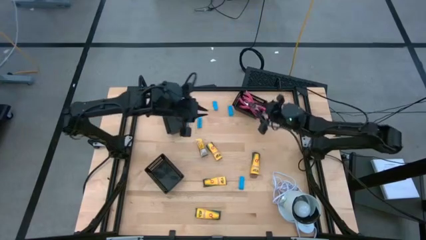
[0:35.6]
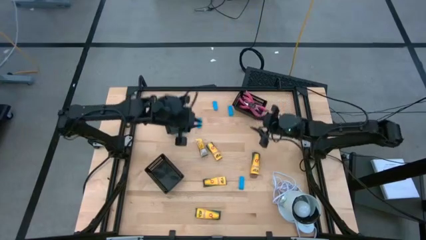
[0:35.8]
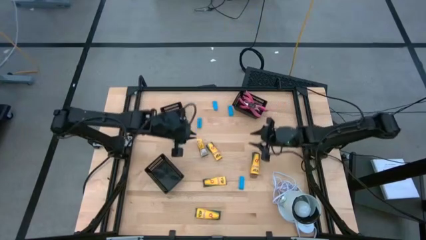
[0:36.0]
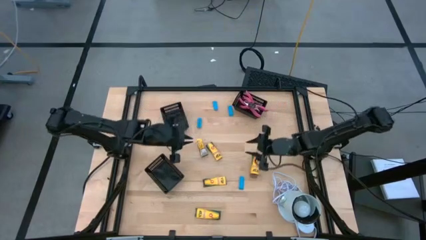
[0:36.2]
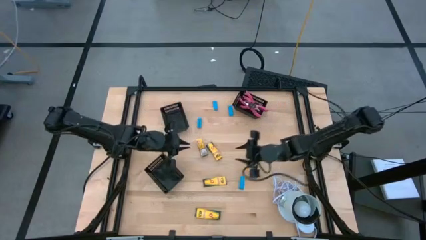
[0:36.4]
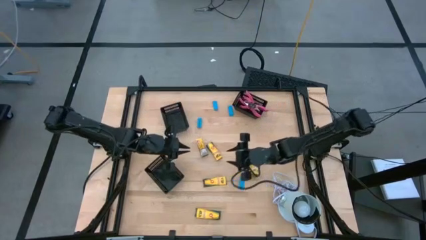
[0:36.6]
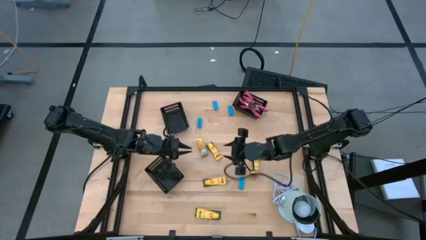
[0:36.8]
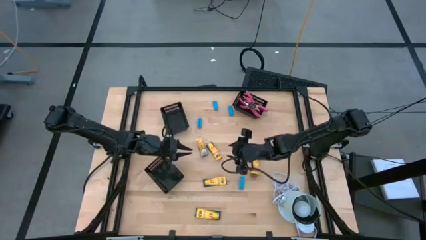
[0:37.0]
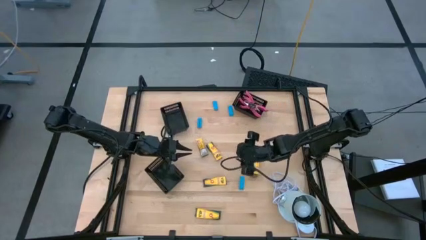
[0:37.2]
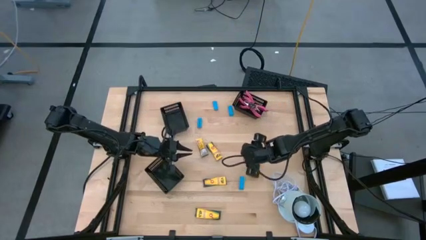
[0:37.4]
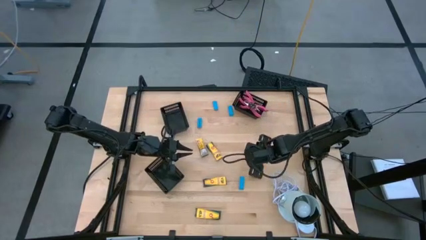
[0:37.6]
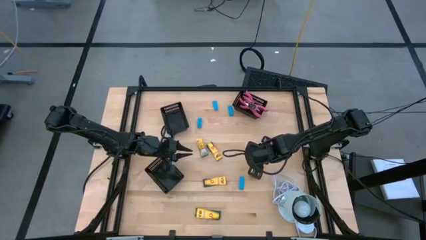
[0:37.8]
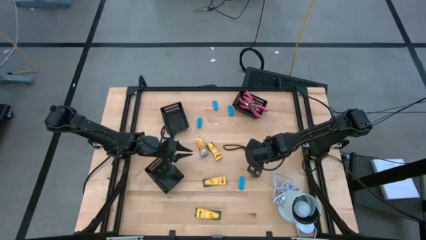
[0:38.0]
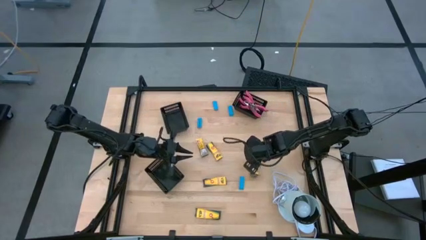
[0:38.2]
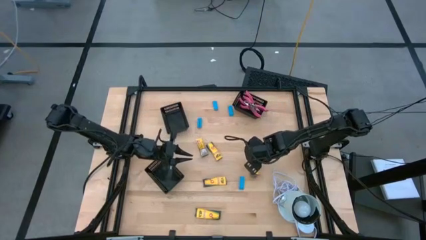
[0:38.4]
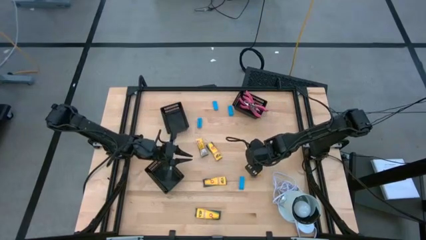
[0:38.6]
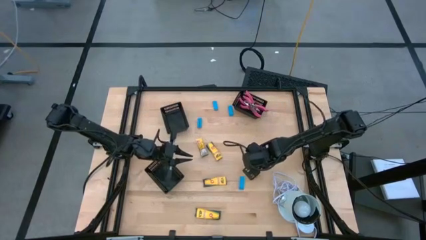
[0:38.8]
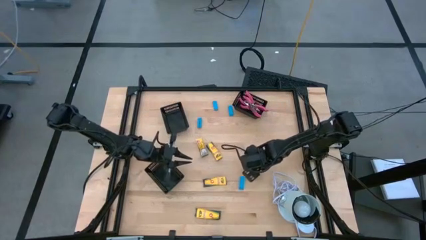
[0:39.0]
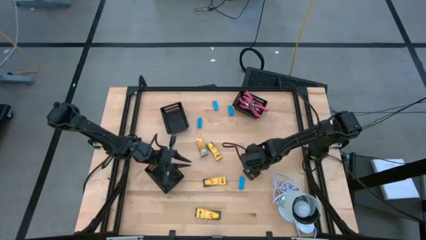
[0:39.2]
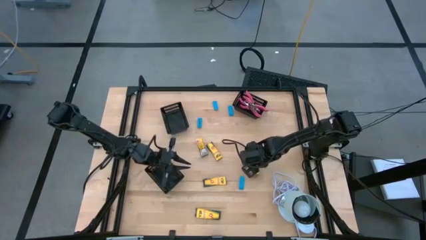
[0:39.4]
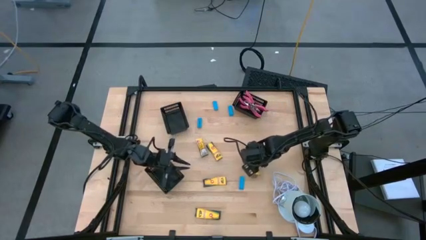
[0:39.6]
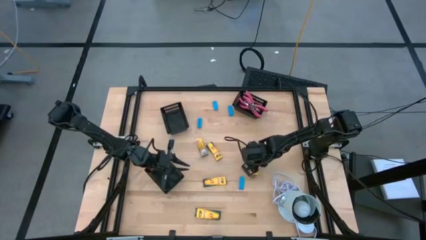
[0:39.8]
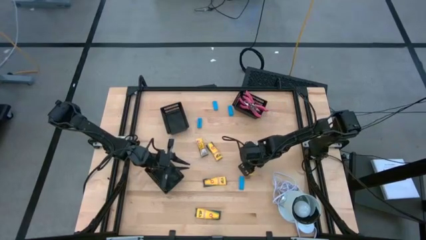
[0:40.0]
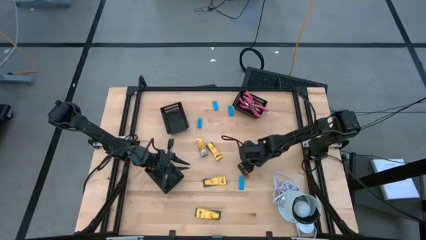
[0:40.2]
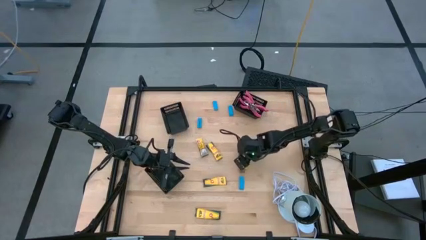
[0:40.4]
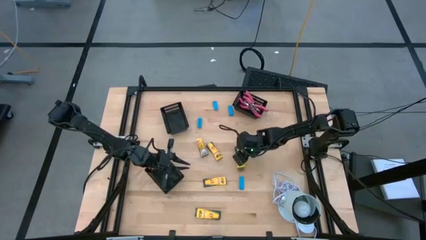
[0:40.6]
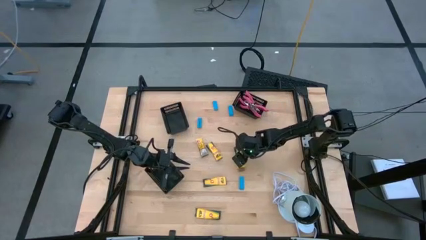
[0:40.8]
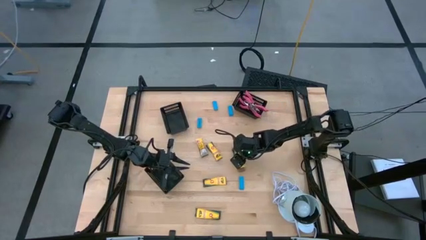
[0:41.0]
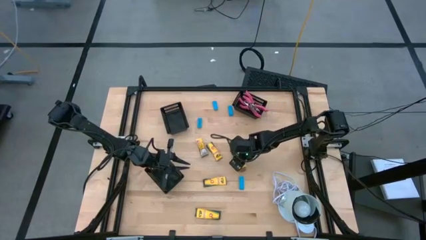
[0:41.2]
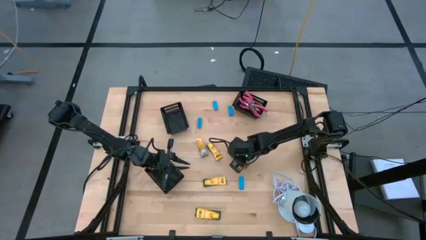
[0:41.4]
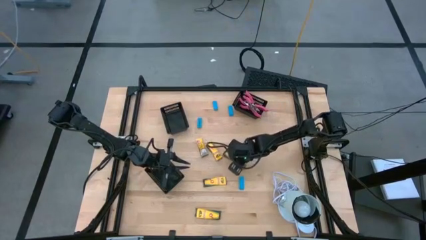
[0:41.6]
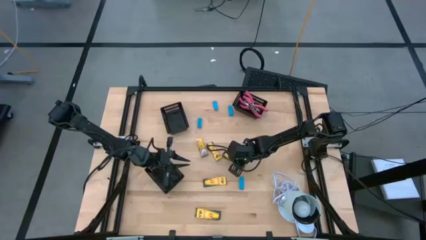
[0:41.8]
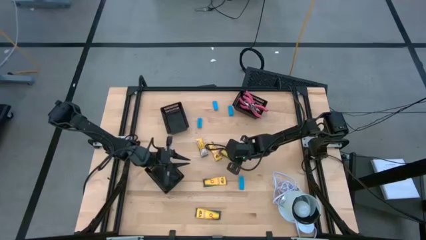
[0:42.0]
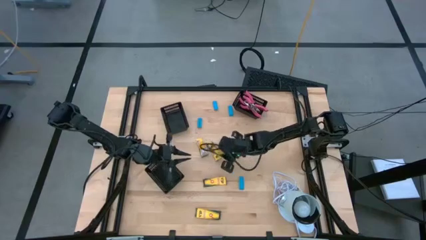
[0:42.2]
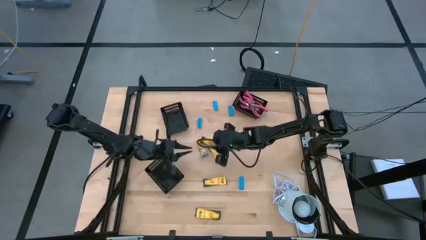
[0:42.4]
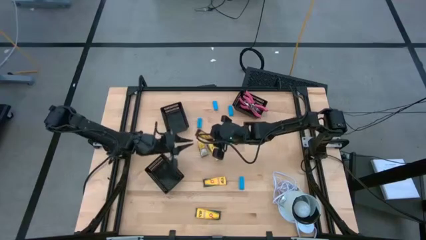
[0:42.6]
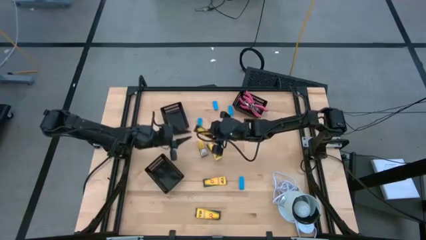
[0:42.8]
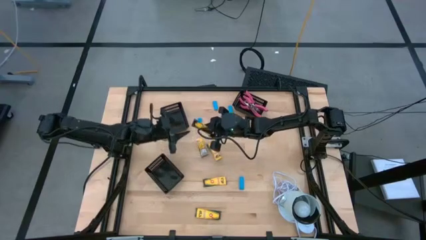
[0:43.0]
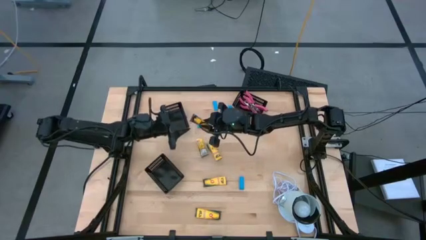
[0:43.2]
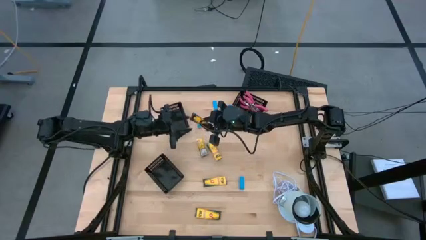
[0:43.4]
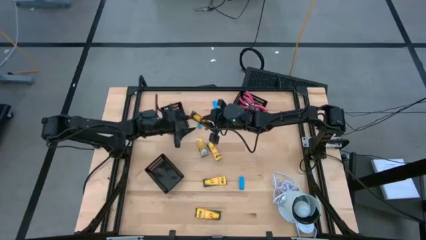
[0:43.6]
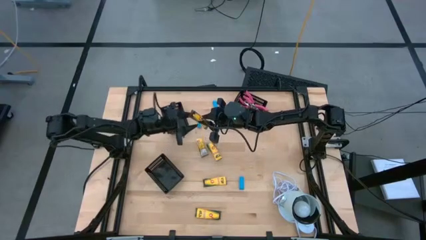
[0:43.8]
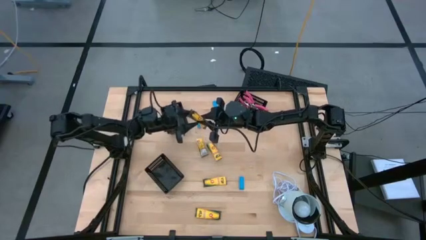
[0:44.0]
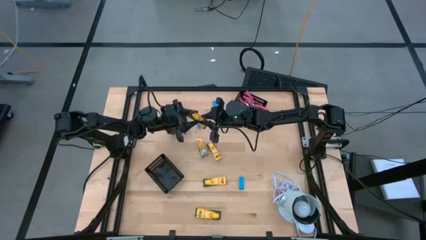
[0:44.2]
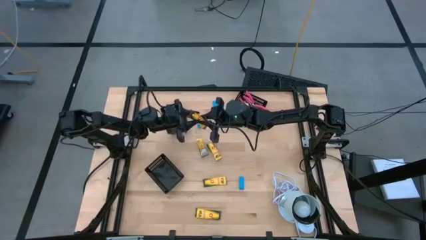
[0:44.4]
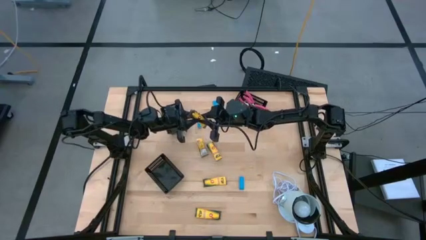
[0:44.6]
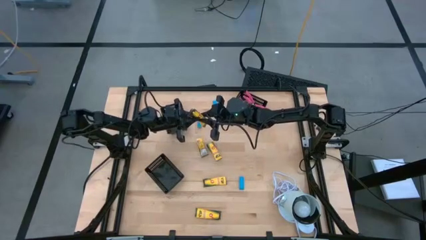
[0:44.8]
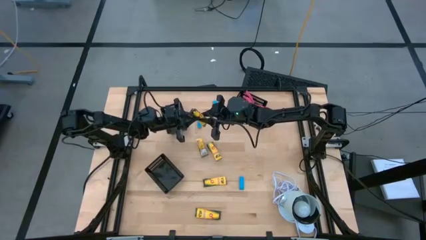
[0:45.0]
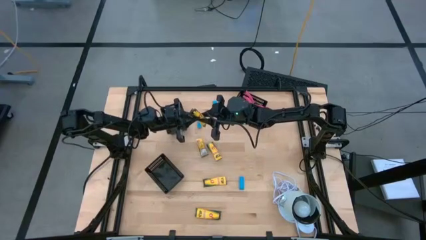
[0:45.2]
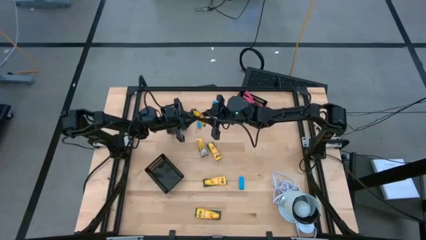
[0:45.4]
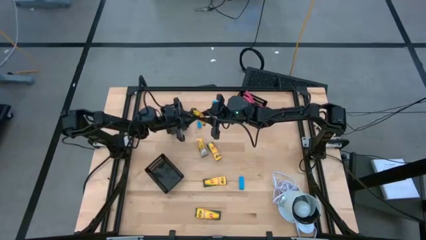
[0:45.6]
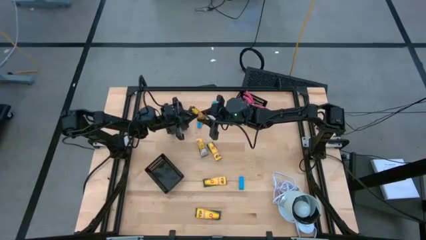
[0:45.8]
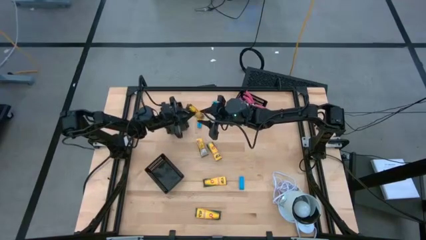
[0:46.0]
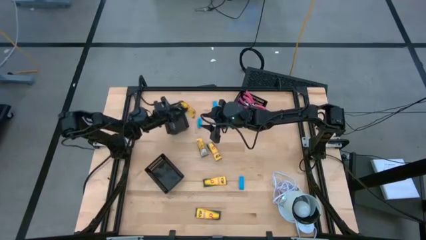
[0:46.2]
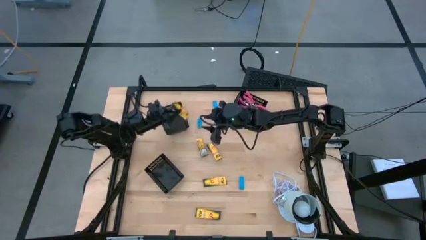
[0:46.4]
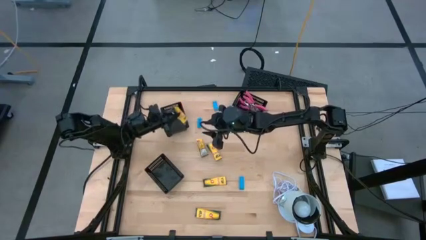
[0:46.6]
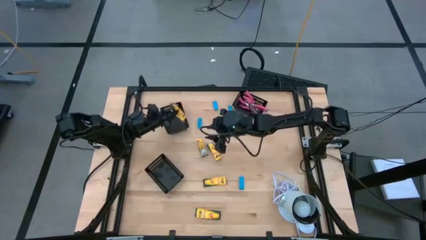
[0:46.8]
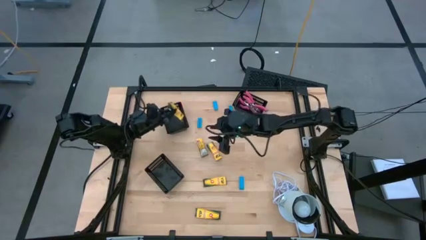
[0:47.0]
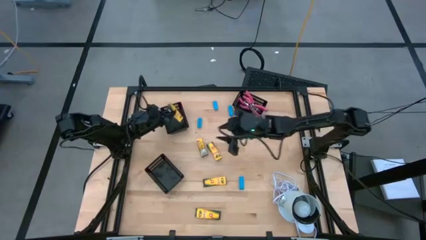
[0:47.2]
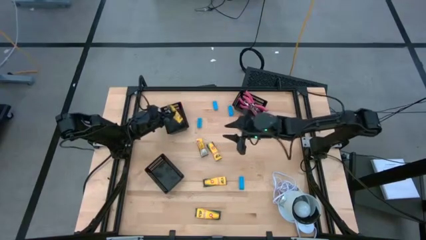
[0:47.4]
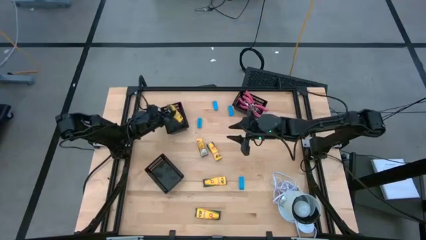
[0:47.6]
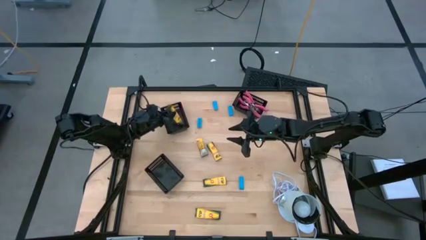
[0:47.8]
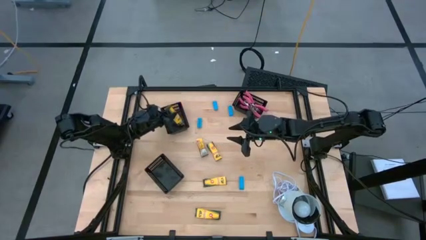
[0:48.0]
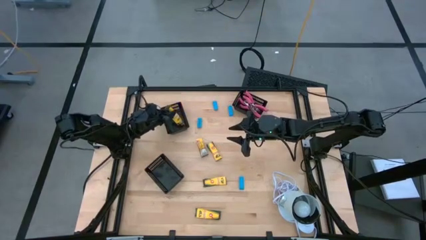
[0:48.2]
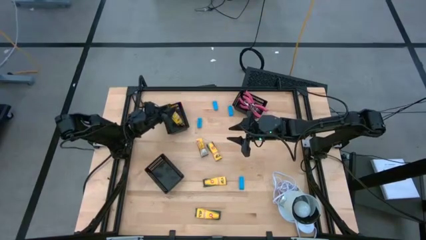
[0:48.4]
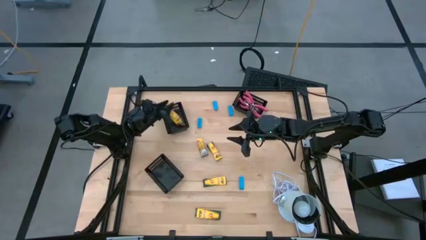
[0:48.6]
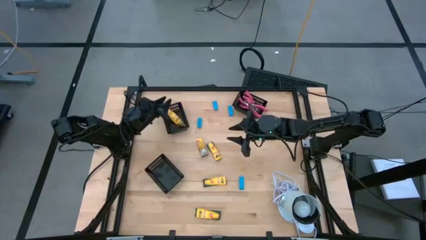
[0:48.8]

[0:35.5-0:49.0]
Task: Pick & Place School Supplies
Put the yellow crayon box into the middle black bin

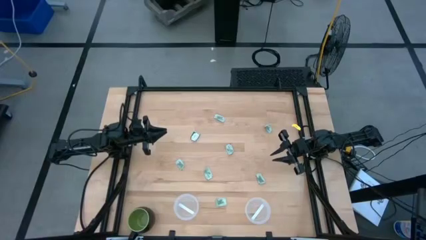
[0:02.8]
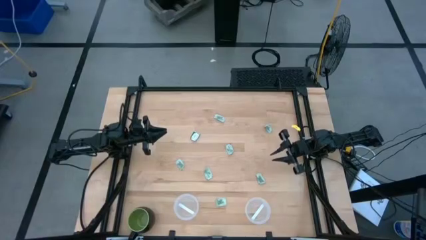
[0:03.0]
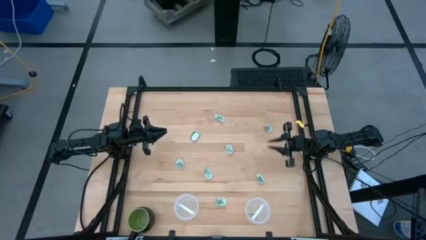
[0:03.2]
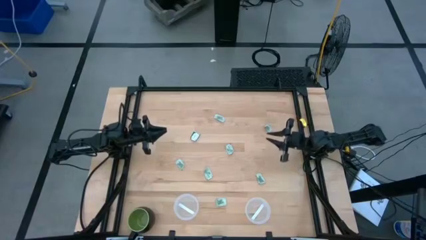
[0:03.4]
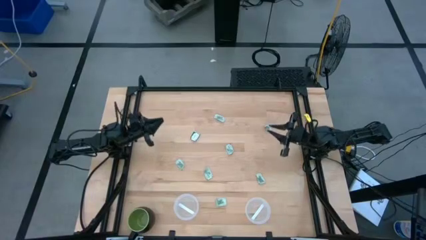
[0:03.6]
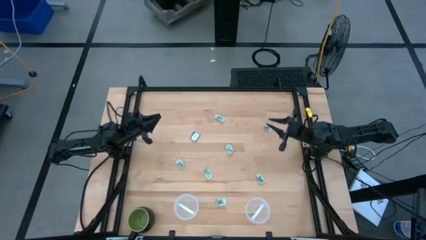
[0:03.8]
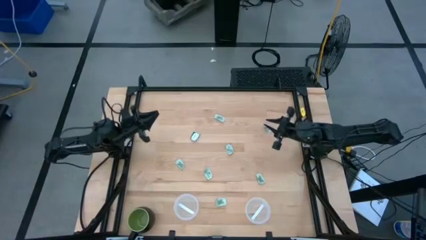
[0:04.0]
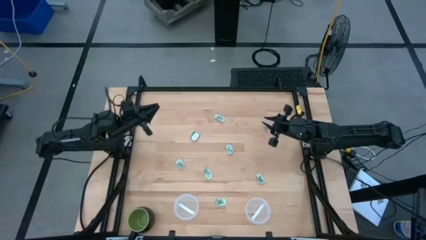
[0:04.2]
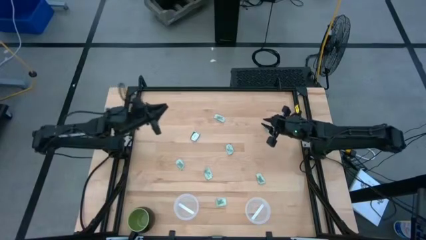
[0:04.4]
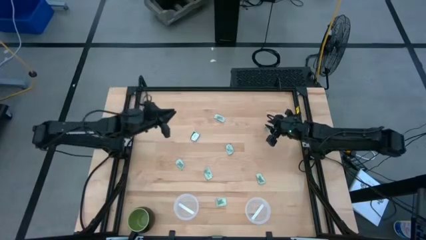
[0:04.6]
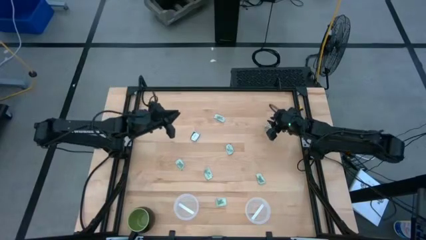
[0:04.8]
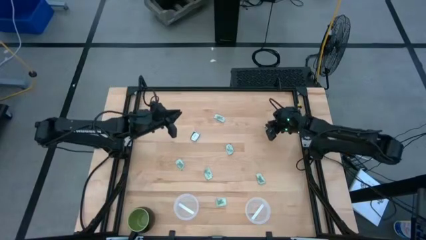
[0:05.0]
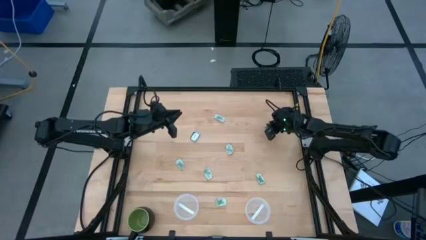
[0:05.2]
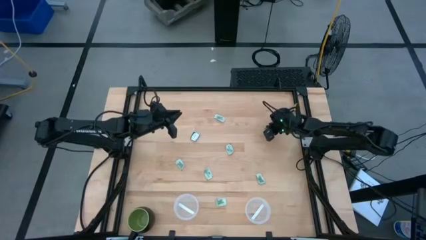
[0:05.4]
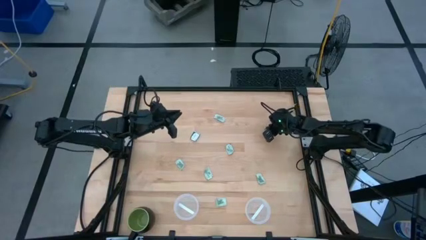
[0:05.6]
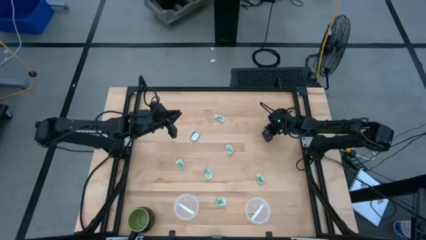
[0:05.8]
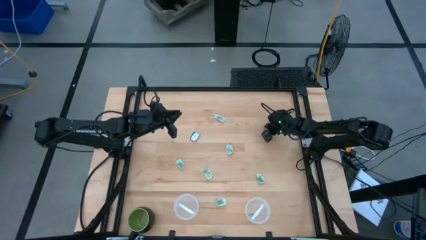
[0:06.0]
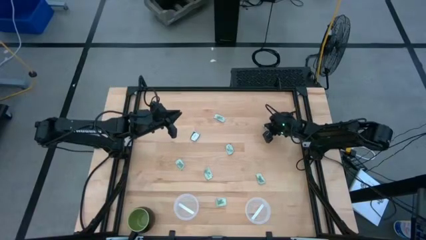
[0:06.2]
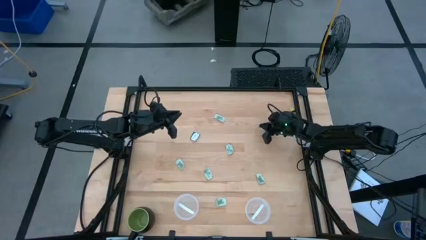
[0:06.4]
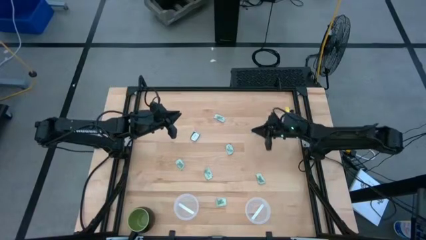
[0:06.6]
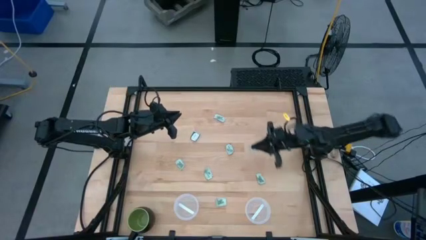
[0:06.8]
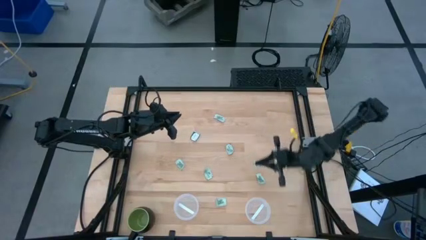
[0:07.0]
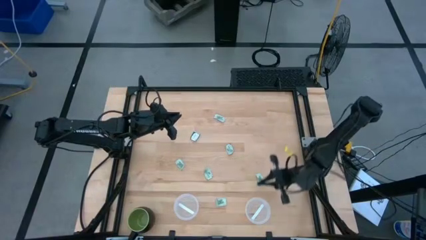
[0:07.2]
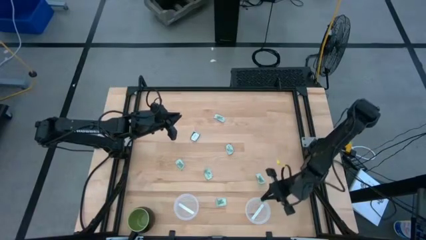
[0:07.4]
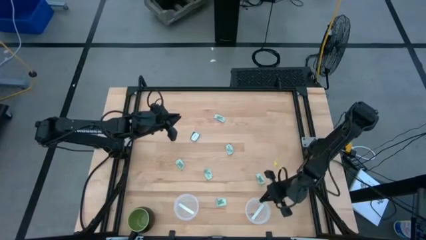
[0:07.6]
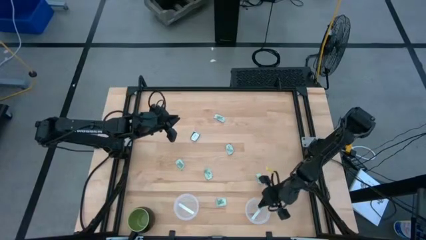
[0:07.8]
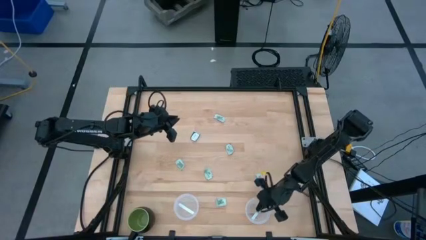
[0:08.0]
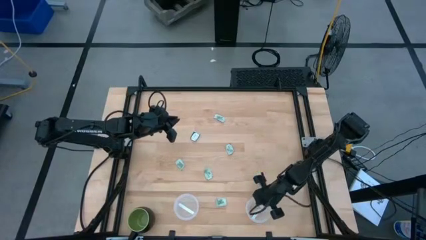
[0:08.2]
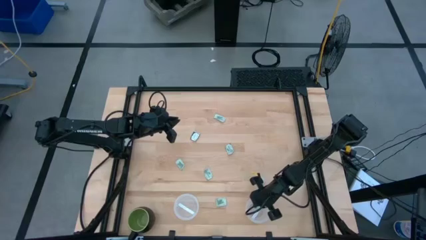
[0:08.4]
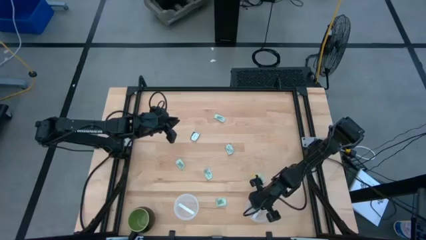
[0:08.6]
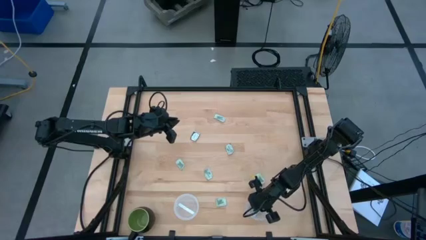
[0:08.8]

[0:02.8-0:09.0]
Task: Pick and place Stevia / Truvia into bins
Put the stevia packet into the right transparent container
